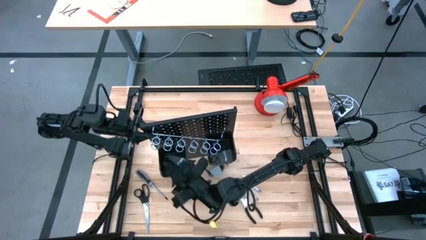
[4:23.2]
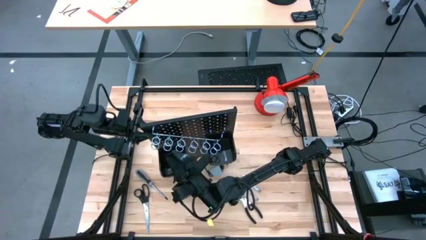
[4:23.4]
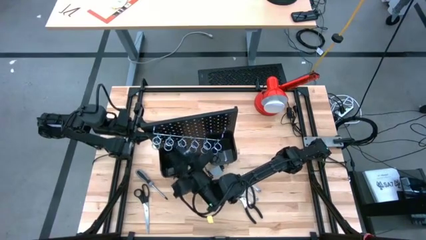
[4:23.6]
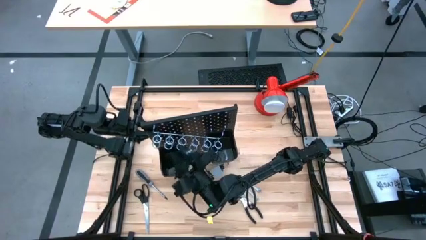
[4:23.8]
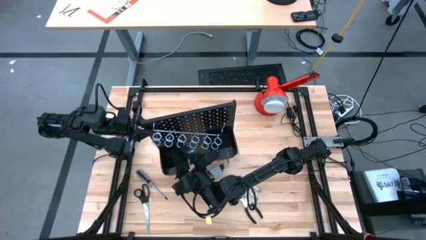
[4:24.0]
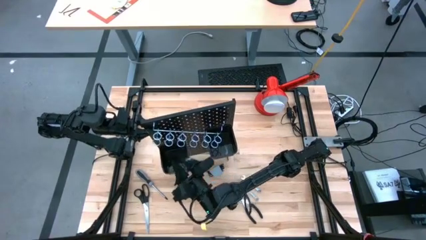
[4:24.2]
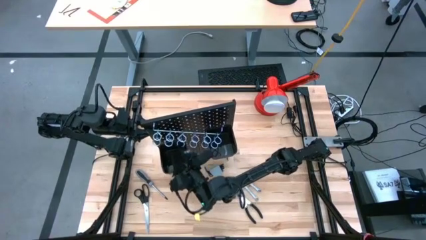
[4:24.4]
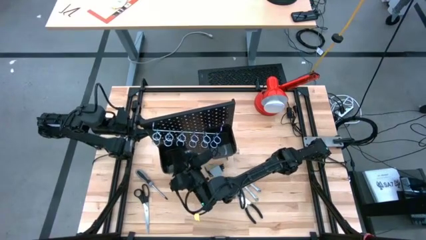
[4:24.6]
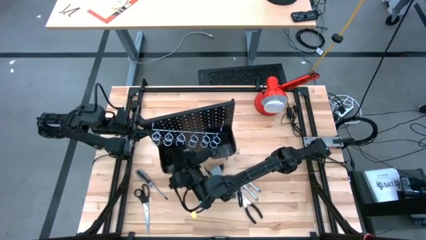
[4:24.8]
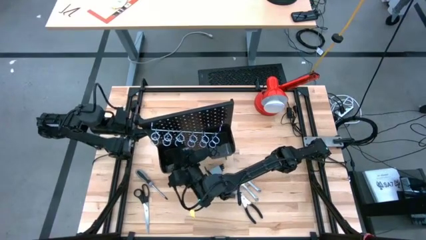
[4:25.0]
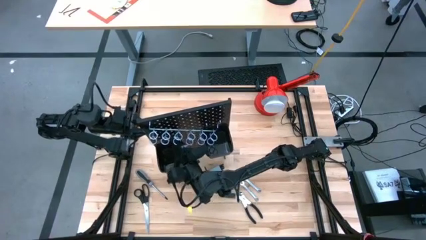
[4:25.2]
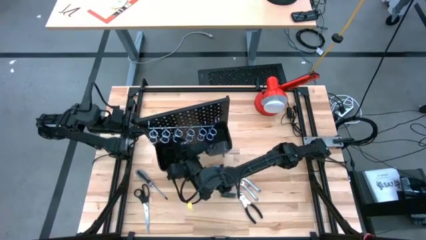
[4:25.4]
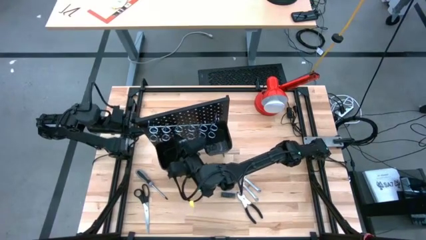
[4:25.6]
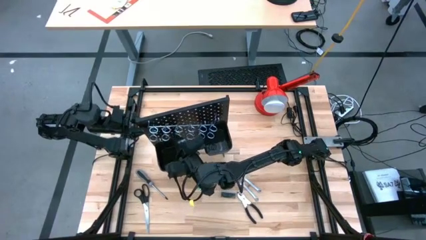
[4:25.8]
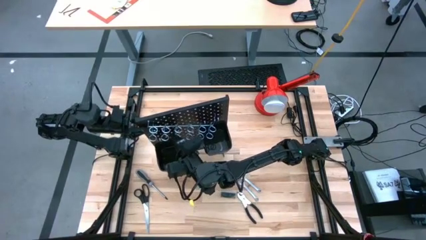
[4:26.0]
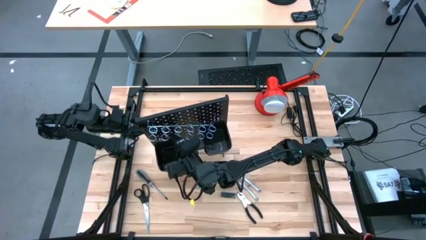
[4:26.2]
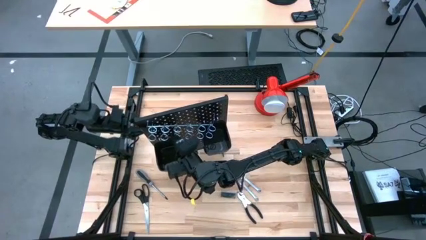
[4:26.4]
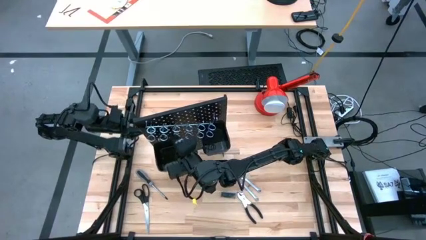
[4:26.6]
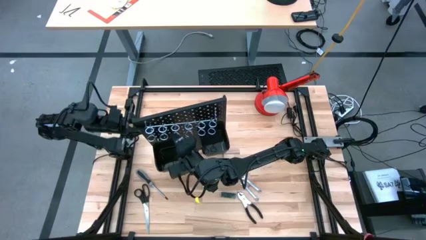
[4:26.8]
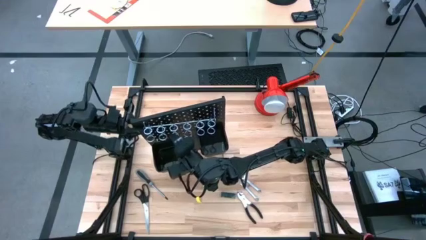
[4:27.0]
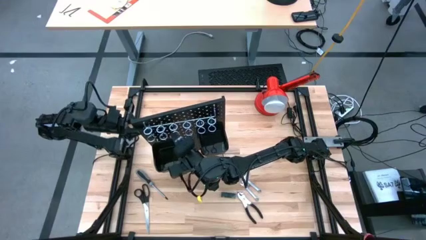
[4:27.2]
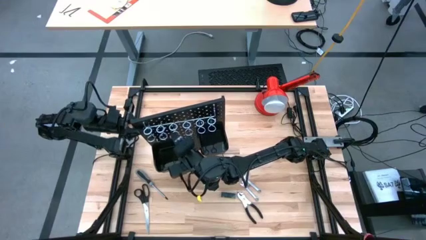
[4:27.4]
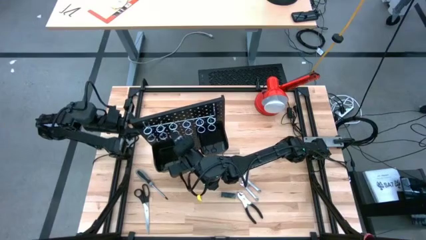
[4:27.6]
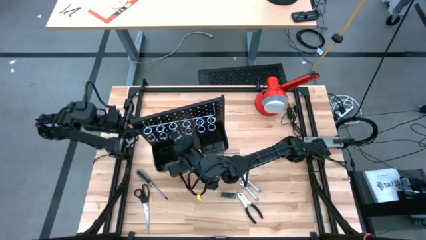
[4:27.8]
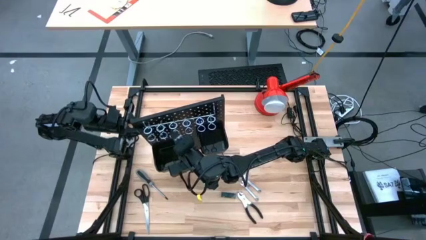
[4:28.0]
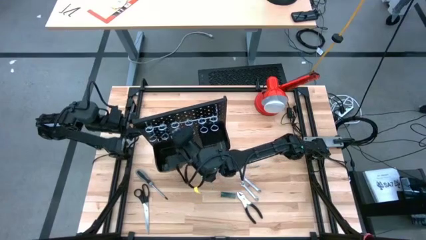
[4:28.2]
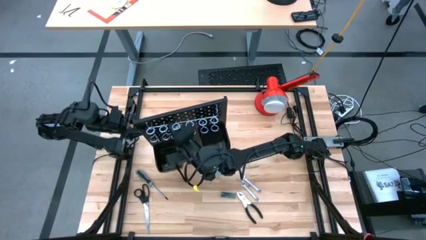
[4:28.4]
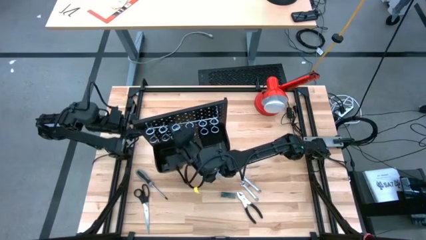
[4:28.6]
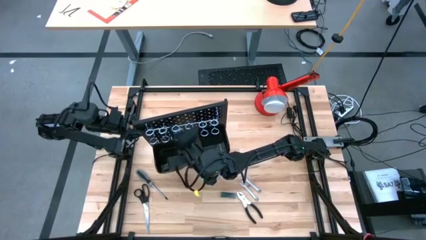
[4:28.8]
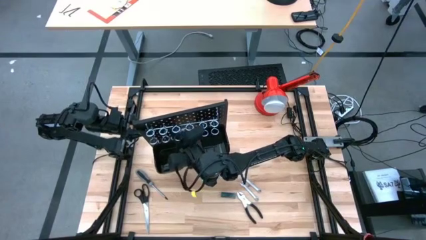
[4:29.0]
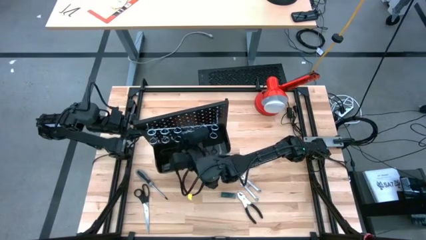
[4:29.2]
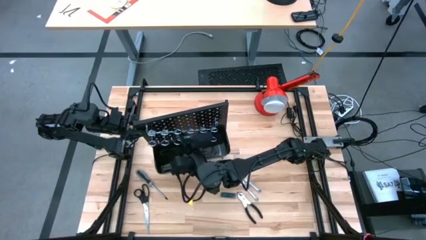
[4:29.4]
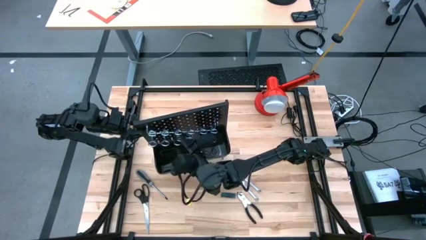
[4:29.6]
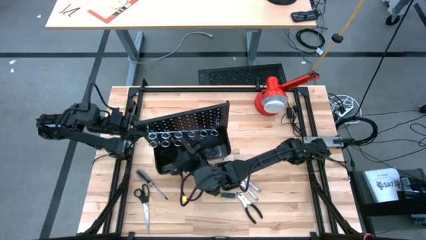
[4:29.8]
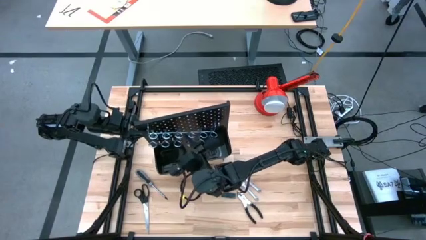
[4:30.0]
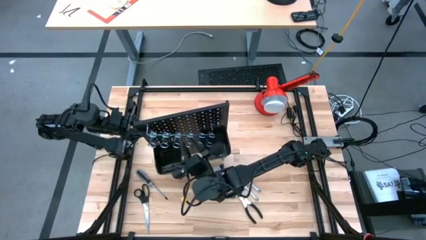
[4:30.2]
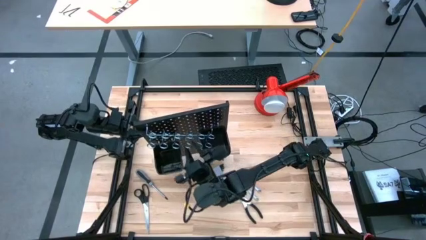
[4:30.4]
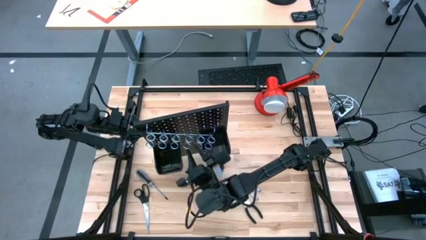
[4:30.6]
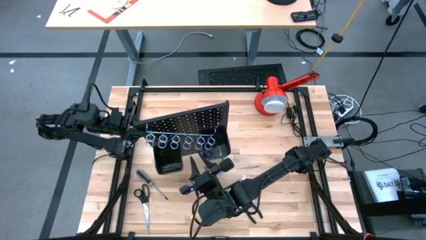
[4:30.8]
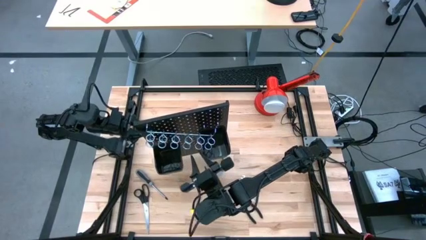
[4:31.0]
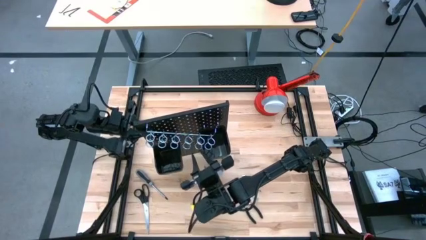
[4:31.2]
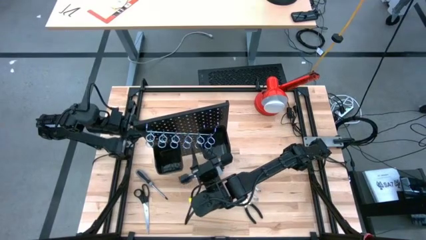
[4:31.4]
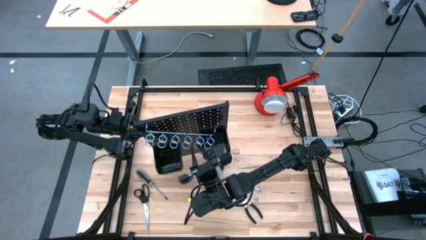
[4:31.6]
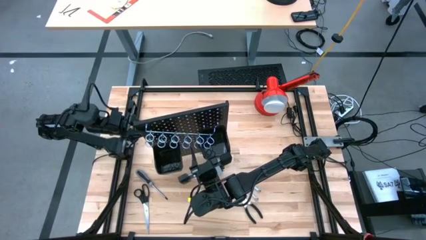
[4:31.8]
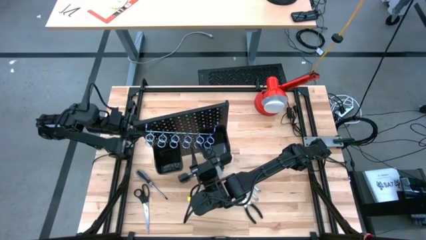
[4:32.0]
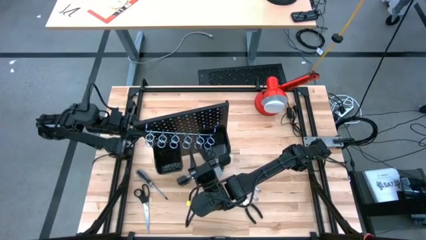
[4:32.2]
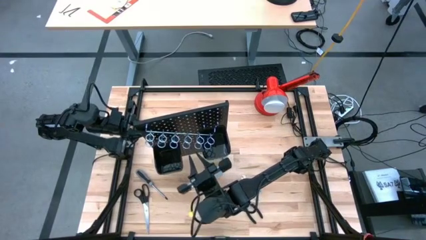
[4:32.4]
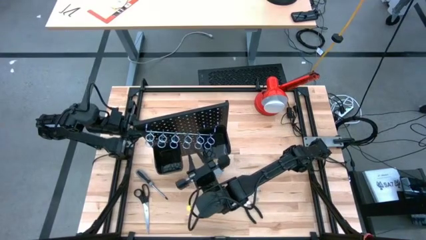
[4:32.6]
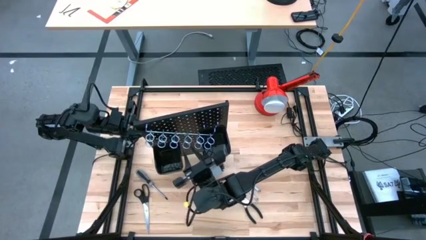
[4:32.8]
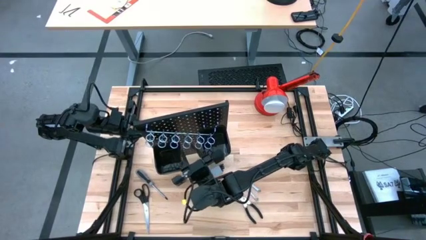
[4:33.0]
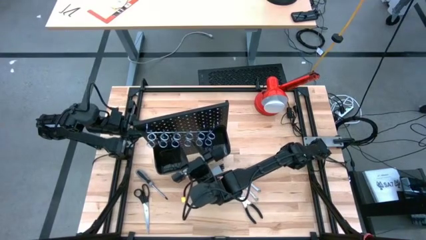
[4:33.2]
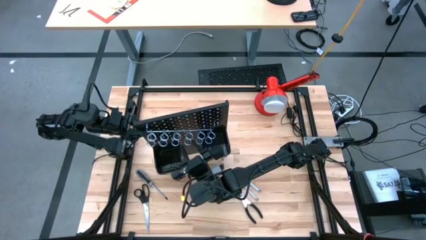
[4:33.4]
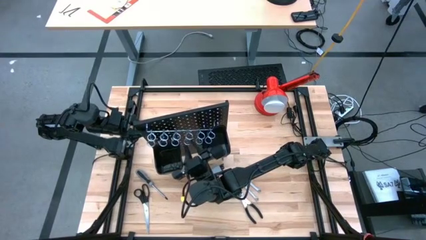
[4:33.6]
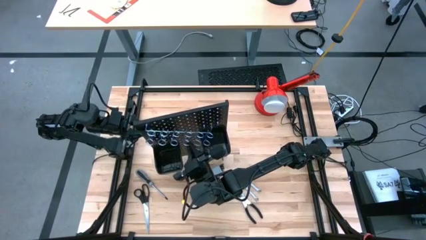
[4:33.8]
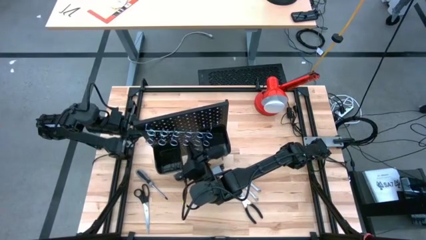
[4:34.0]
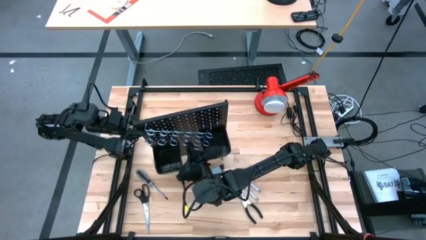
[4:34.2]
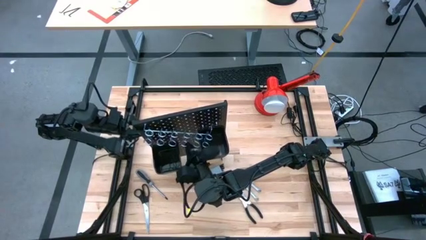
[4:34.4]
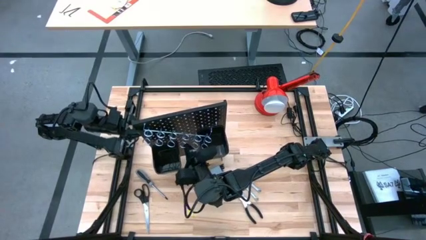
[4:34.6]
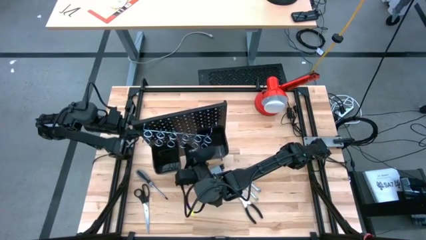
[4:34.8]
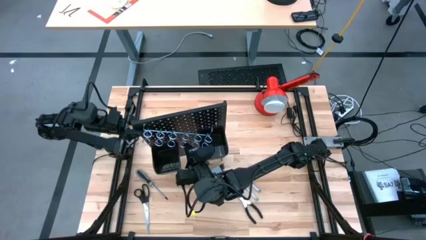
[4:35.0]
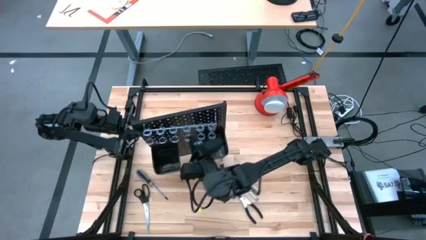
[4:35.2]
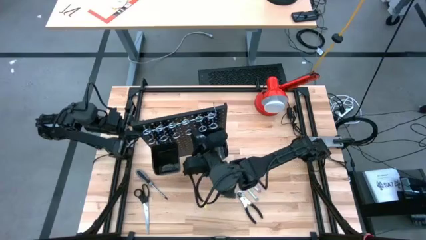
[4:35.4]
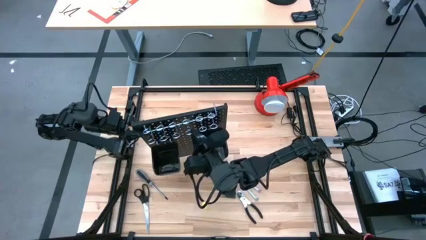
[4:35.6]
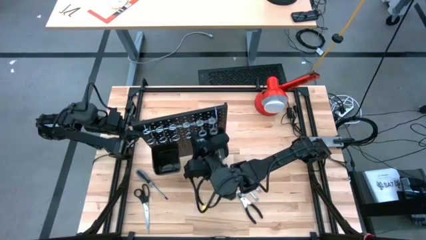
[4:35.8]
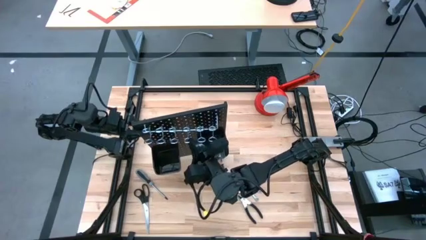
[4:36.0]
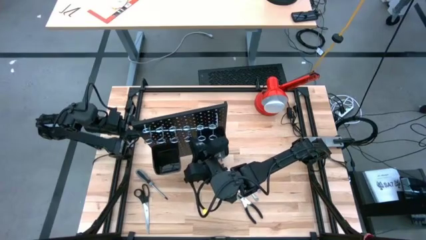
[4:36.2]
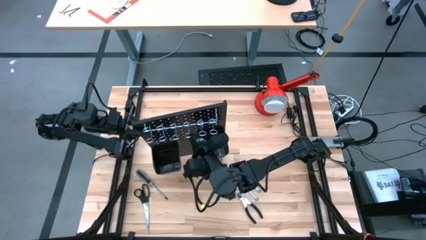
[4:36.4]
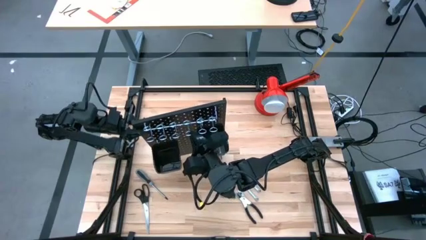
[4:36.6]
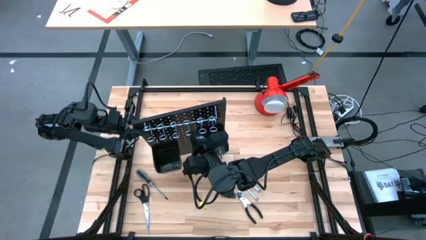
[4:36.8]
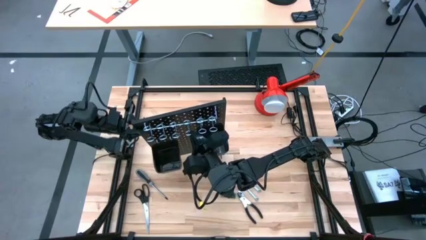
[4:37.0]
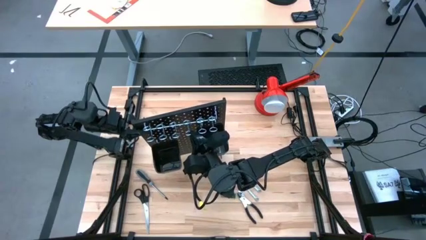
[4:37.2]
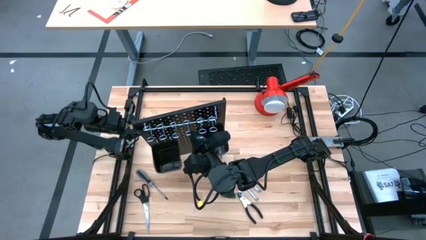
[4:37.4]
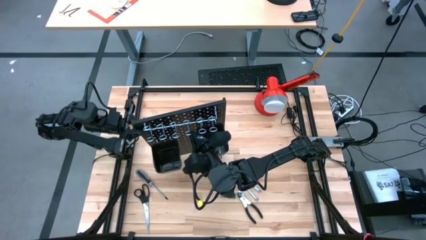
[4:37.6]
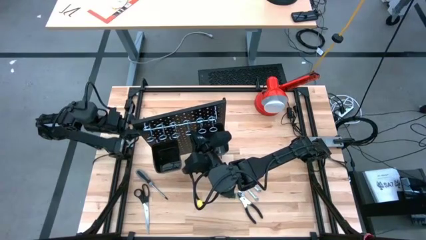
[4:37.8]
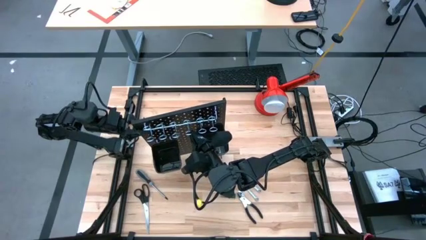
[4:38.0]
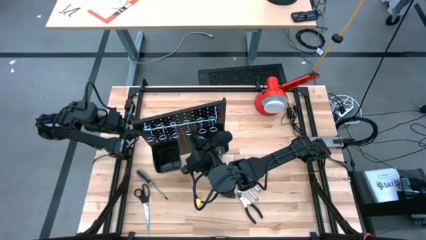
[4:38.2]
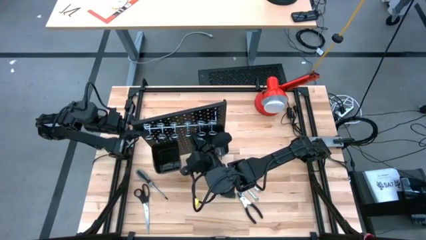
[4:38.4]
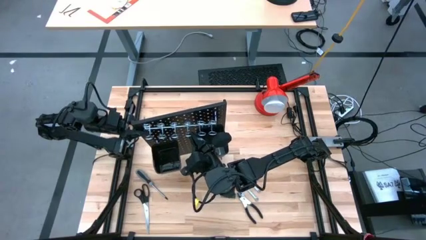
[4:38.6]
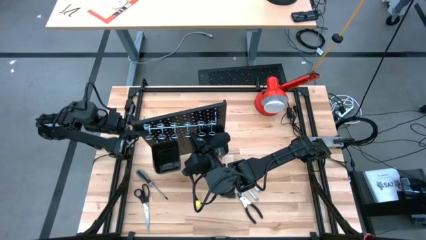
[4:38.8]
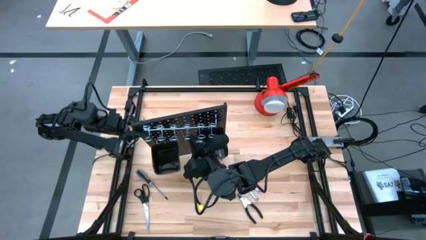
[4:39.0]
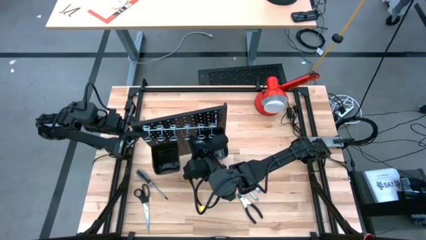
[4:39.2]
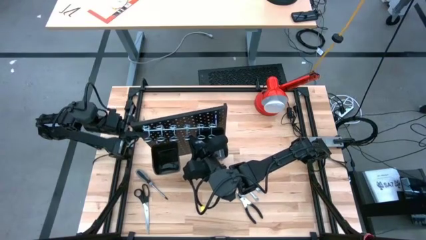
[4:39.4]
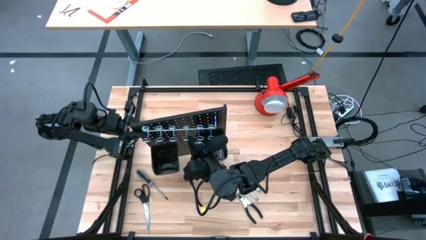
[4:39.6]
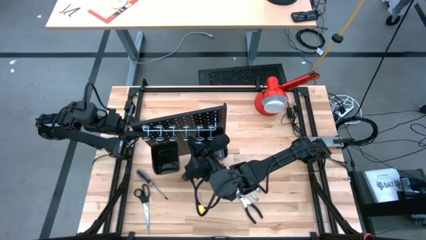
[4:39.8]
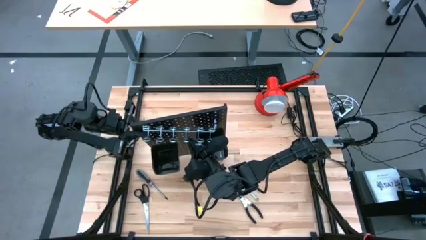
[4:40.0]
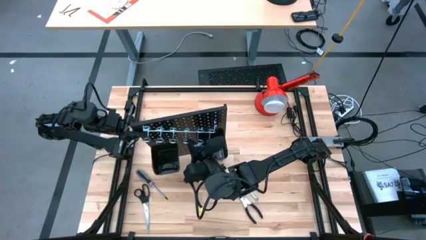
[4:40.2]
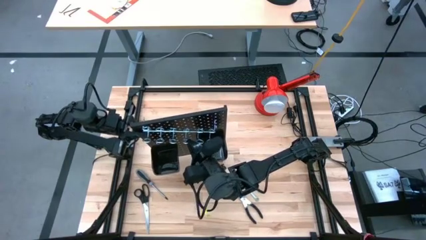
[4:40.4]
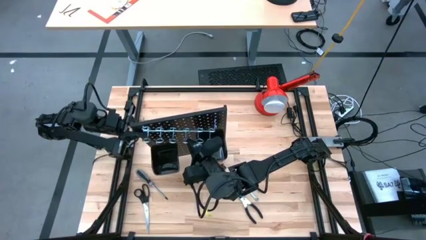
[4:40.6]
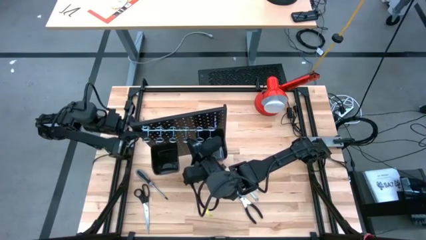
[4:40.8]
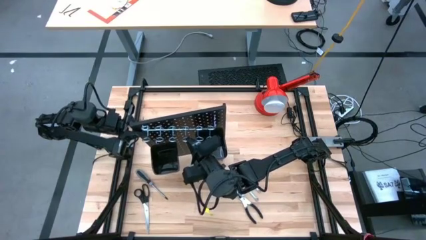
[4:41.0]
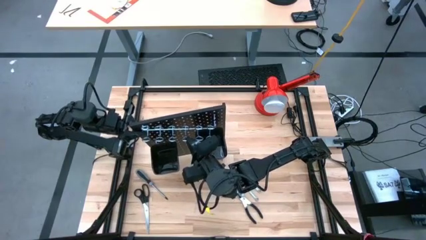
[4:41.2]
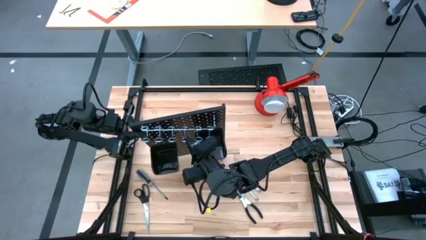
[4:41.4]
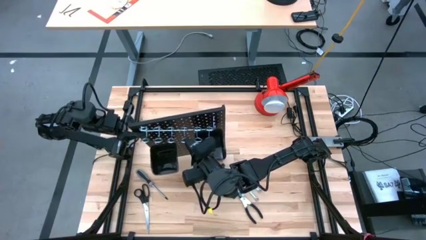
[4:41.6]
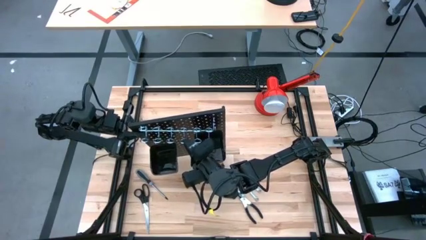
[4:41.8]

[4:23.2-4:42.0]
Task: Hang tools onto peg board
Assemble the tool holder on the pegboard
